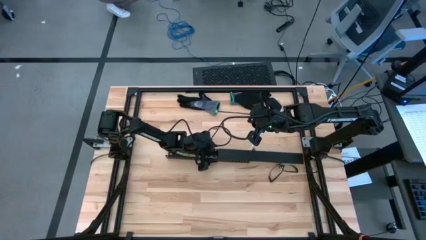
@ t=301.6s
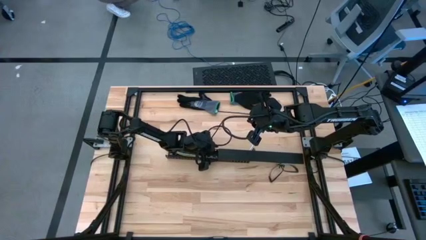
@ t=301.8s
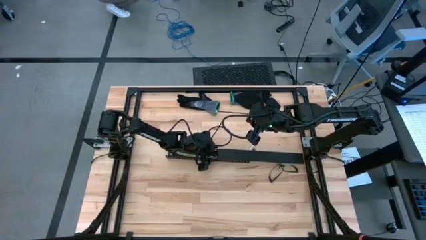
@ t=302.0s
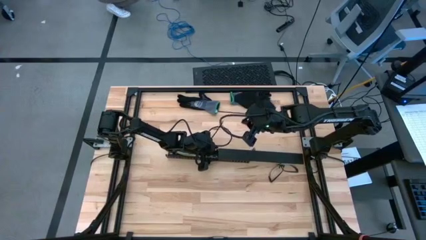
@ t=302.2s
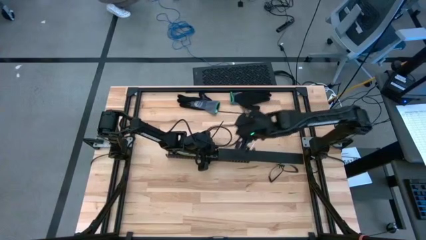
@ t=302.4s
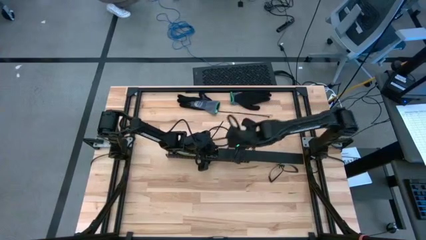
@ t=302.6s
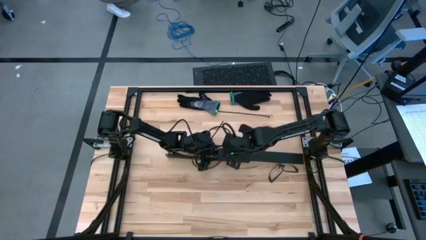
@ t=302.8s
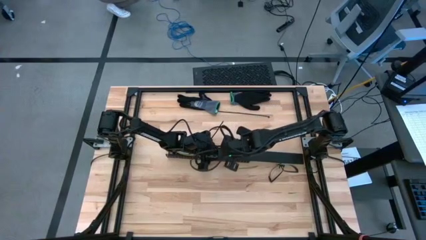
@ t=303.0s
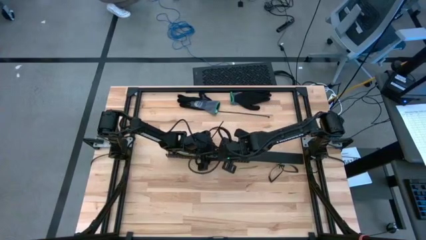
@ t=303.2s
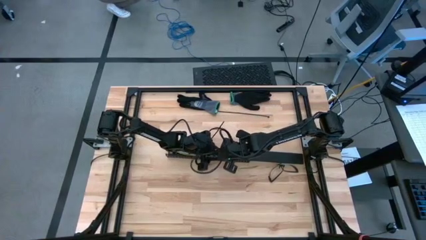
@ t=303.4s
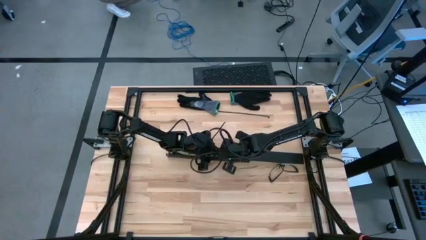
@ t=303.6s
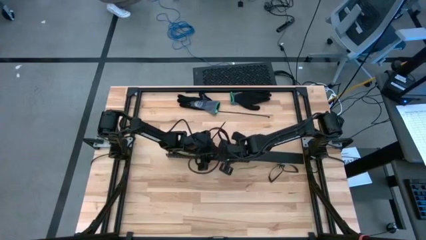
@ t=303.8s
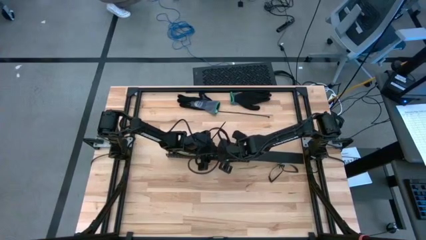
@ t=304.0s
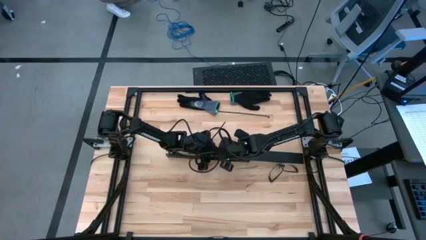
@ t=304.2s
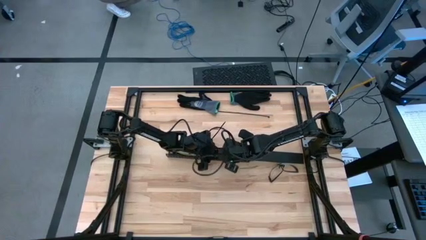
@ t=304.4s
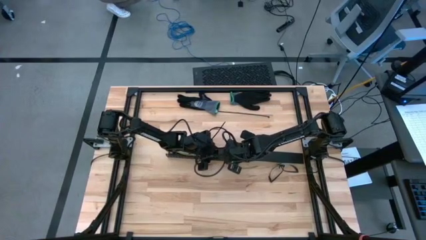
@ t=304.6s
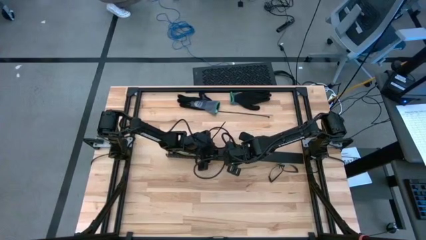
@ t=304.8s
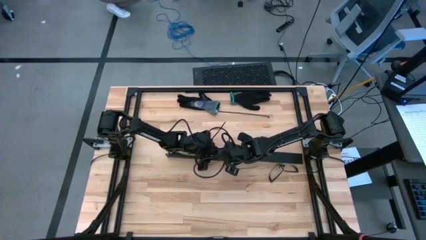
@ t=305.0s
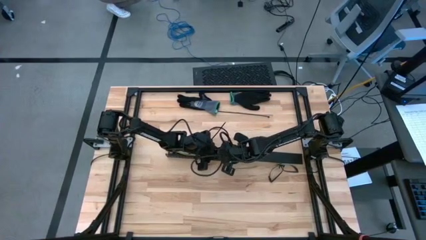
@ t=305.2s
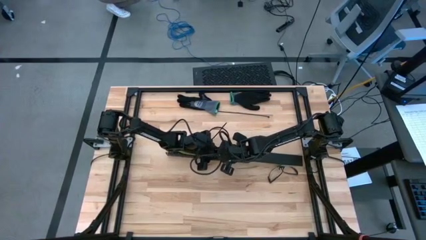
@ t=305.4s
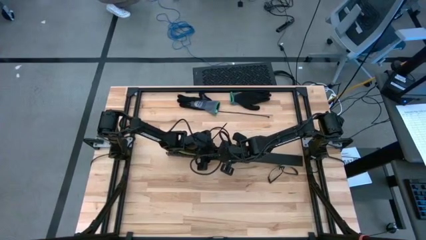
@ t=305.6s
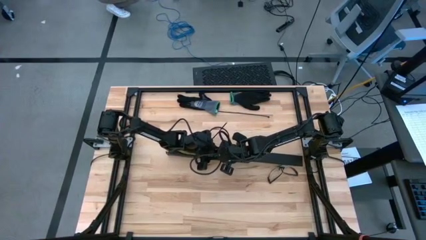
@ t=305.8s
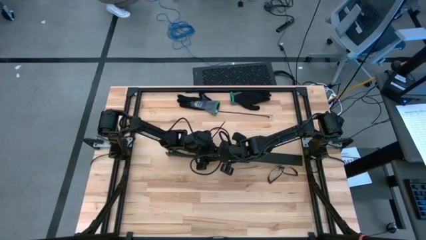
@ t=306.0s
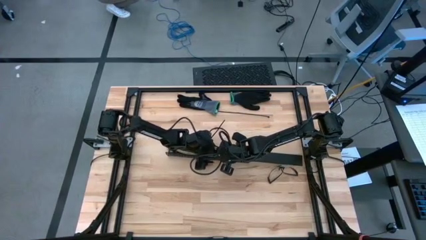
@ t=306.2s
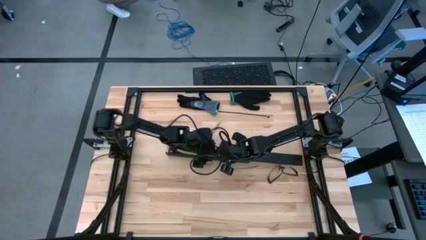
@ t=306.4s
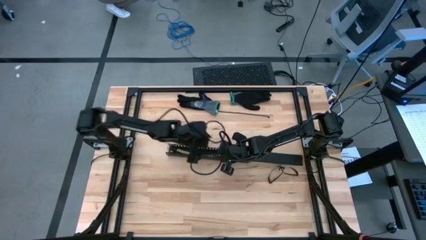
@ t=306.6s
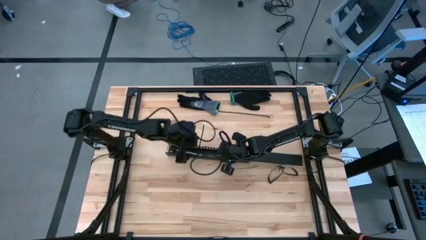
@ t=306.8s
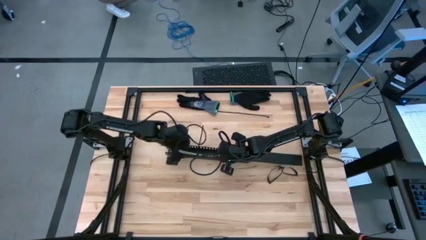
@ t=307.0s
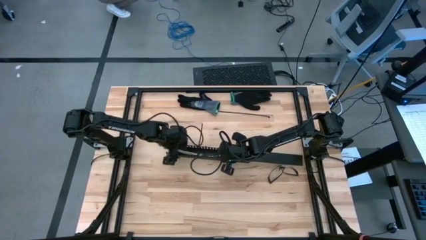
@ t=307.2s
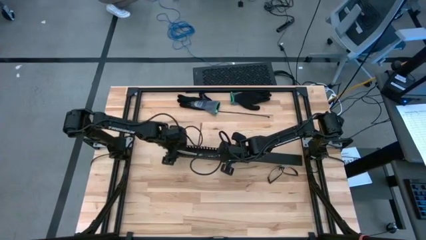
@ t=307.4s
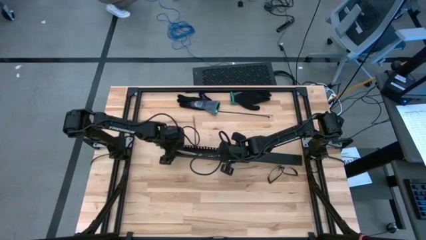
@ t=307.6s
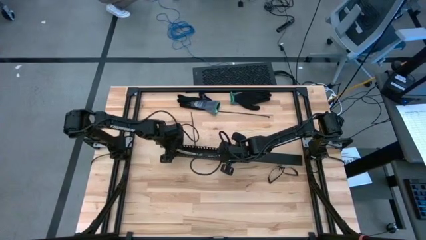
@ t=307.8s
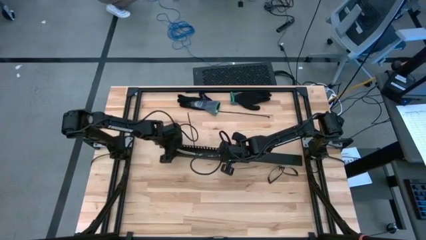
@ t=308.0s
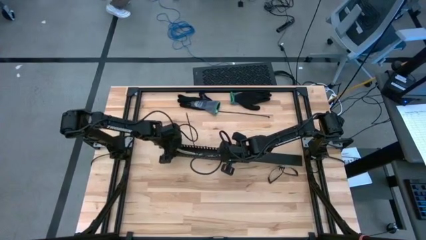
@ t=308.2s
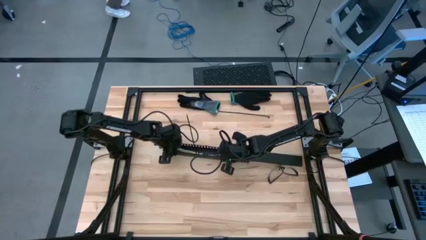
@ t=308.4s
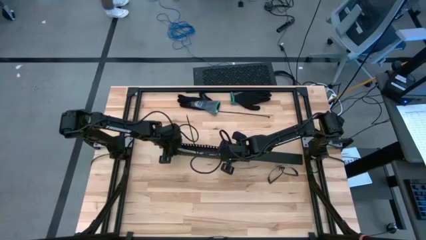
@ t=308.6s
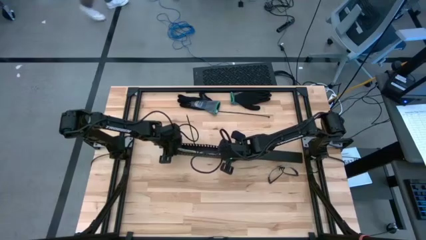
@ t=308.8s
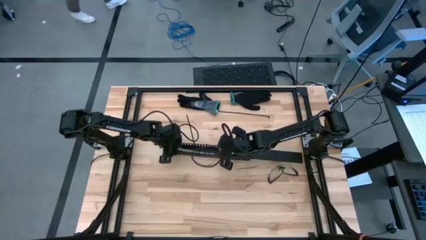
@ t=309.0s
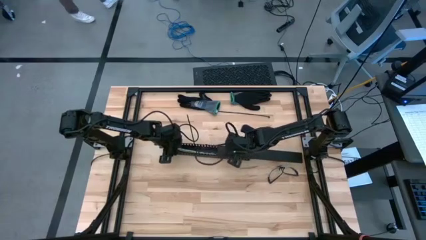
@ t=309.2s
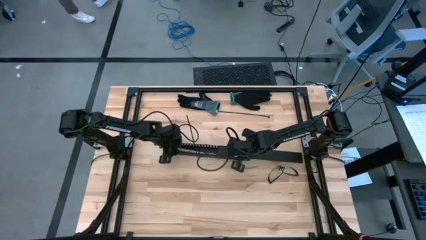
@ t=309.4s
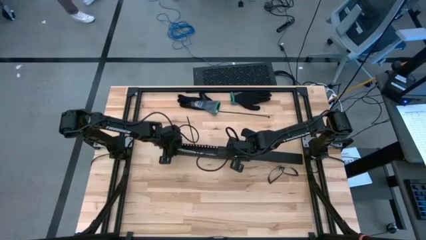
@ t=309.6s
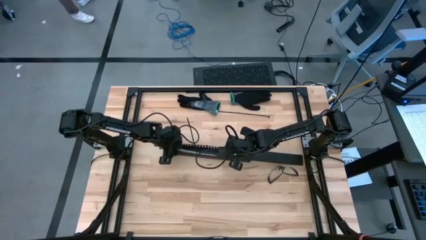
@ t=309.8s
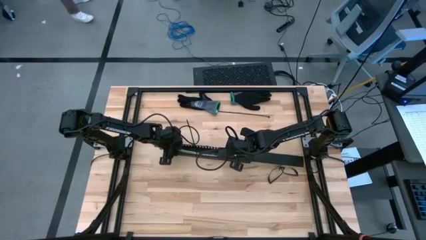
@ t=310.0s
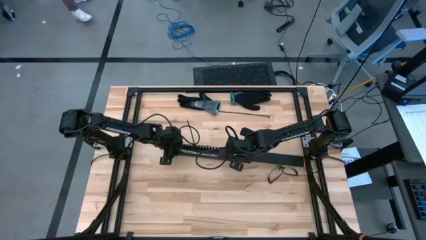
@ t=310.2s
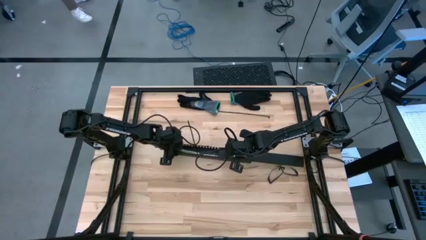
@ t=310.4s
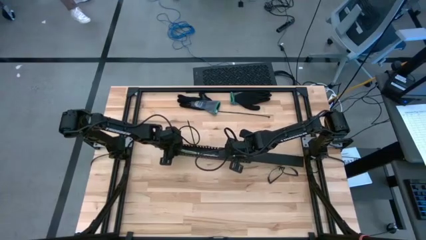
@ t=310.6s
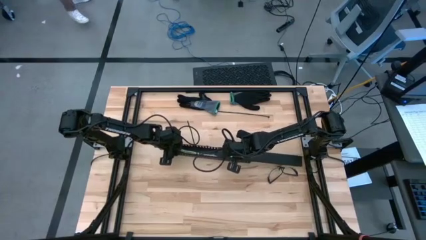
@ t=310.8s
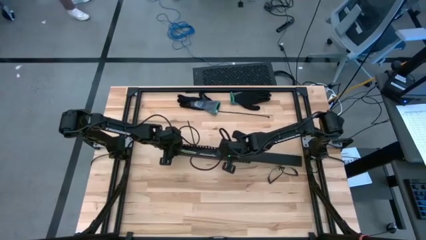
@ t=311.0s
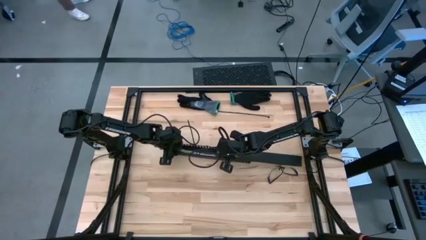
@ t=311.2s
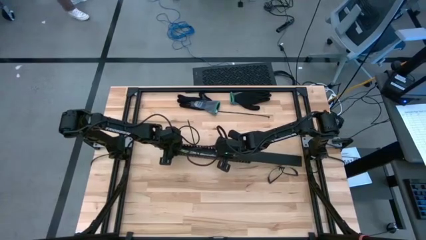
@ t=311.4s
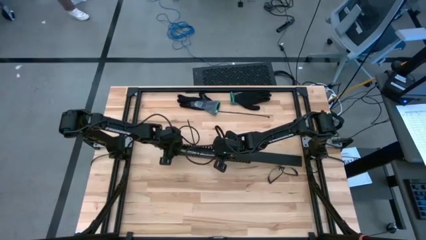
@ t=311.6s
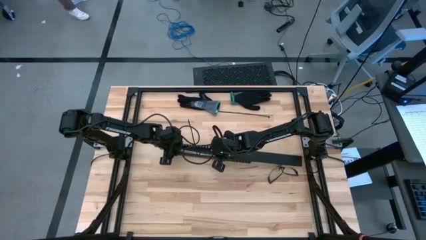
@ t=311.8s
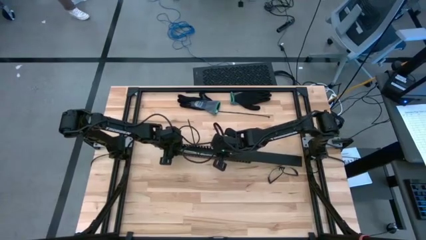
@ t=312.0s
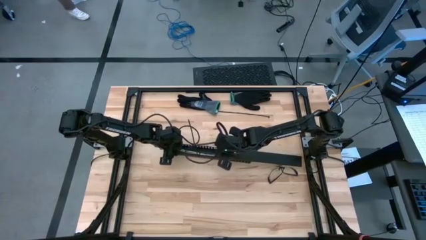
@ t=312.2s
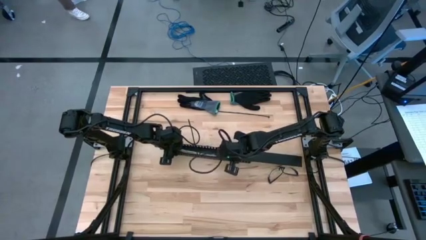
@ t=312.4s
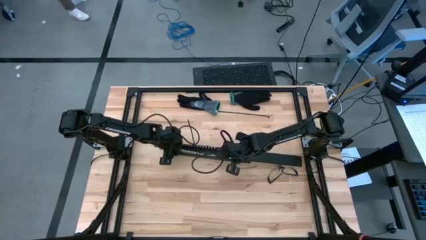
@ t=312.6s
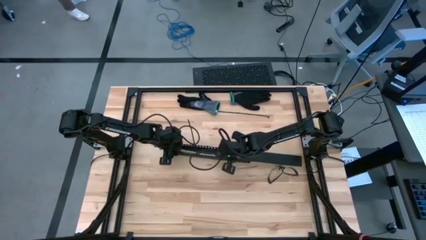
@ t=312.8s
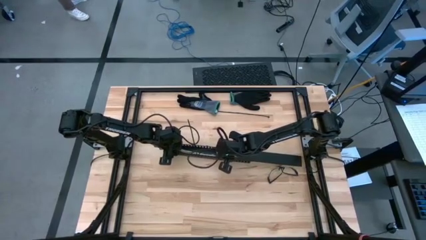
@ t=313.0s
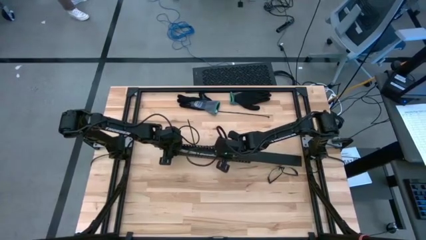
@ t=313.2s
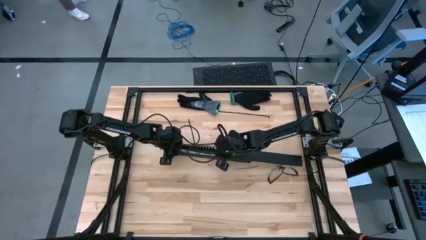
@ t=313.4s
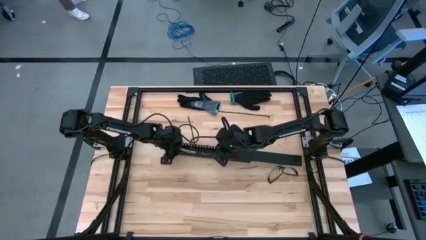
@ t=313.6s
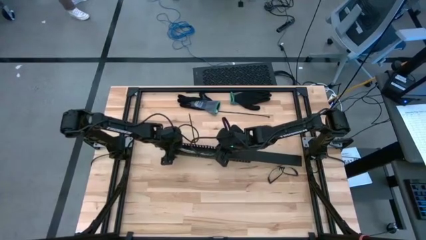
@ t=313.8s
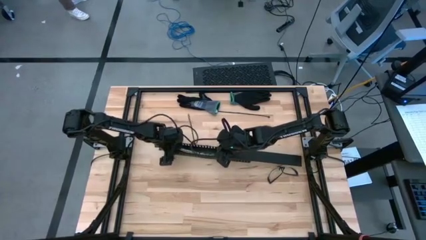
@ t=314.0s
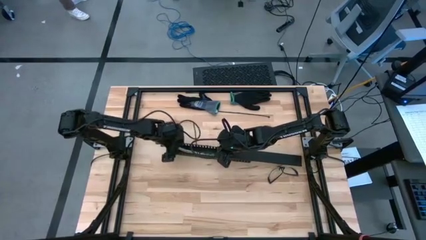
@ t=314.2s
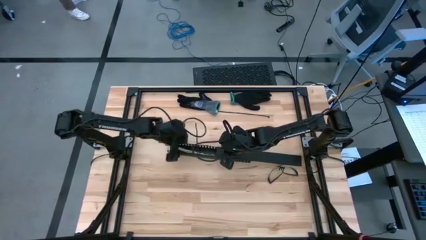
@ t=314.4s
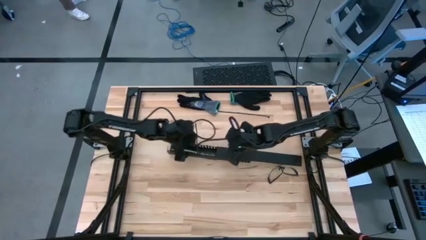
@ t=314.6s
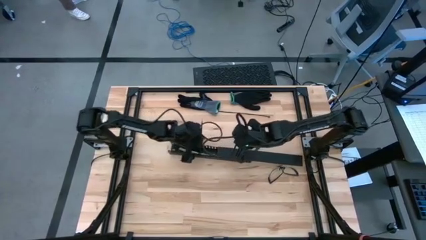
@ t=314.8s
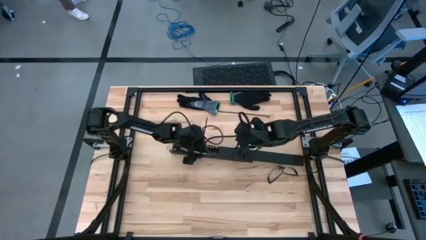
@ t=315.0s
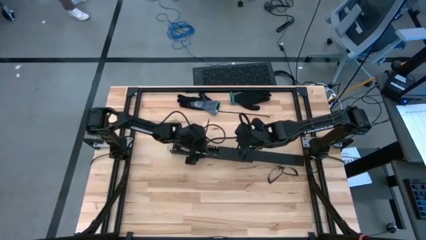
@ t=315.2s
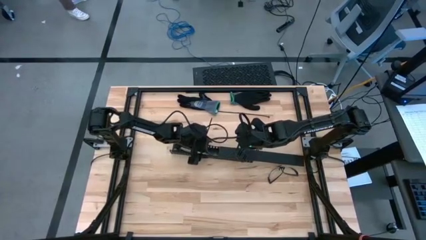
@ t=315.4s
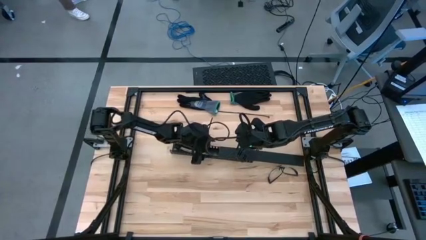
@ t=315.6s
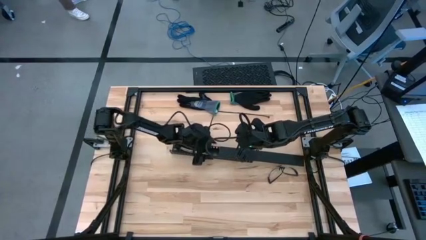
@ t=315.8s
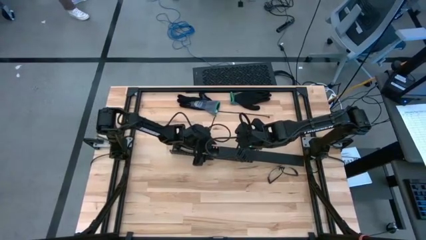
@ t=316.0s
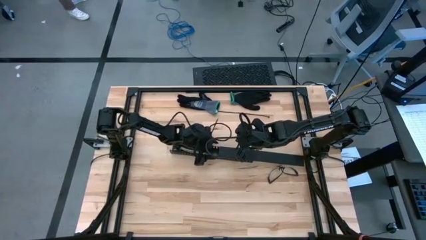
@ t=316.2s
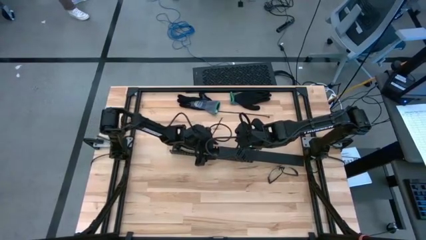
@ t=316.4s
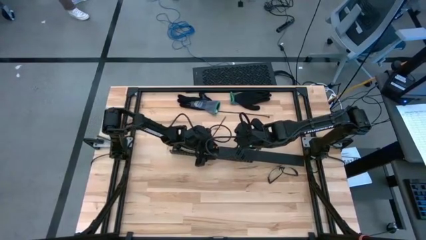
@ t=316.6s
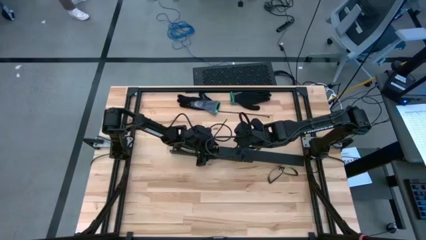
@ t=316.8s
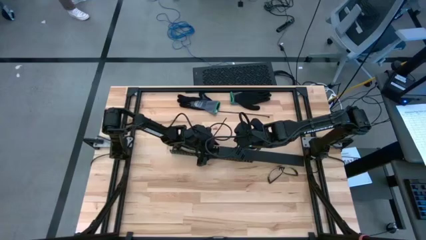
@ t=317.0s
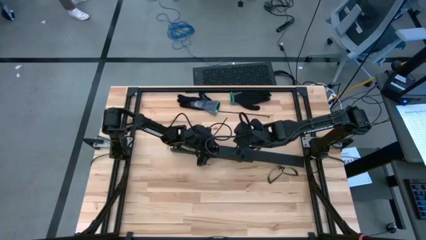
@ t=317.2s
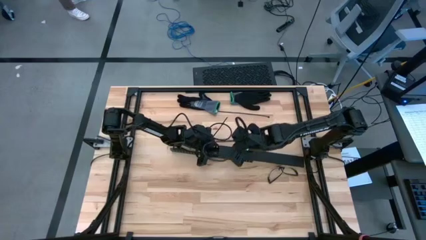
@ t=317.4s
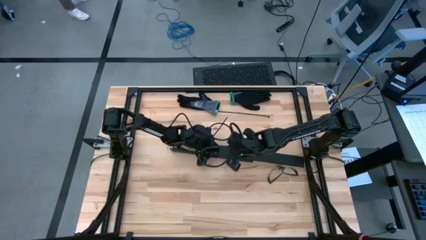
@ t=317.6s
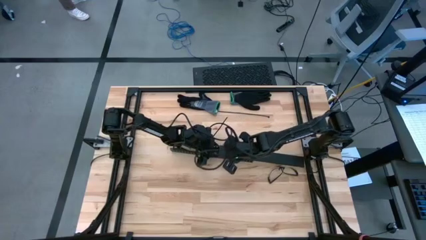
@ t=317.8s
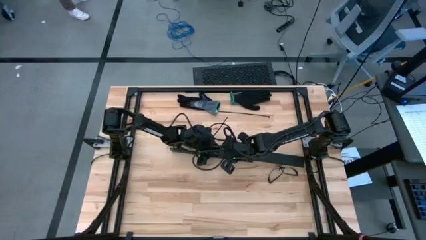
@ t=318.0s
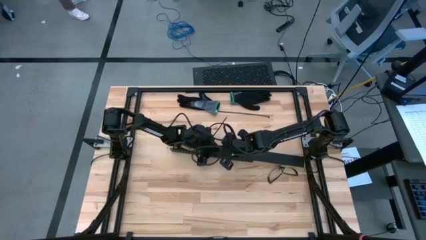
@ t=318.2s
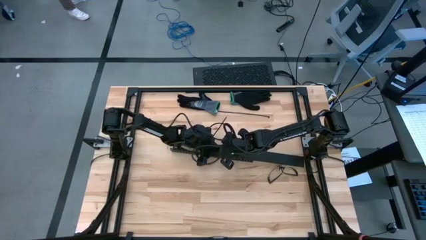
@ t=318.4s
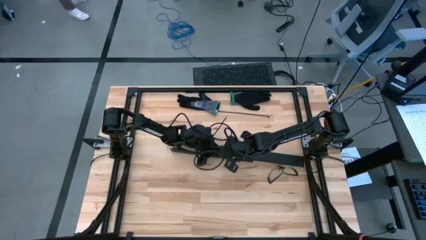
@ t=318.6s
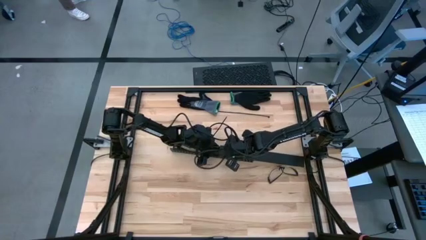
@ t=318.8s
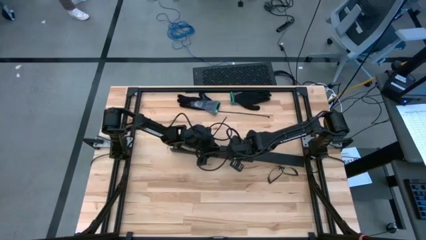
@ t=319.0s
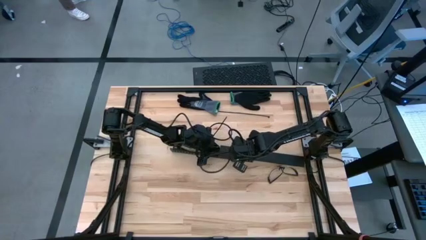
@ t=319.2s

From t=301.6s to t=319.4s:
Task: Ziptie cables
Close the black cable duct
